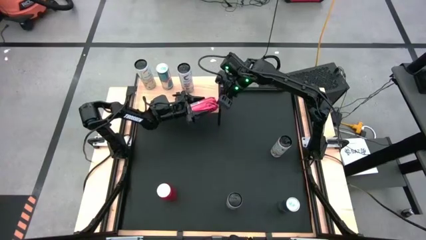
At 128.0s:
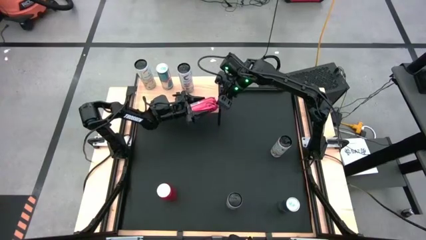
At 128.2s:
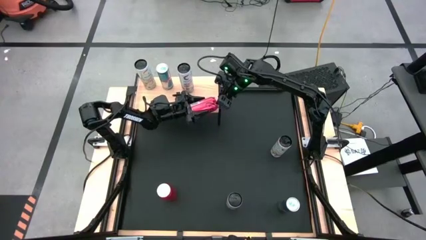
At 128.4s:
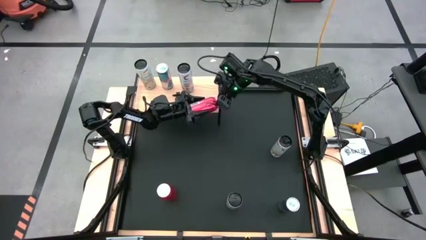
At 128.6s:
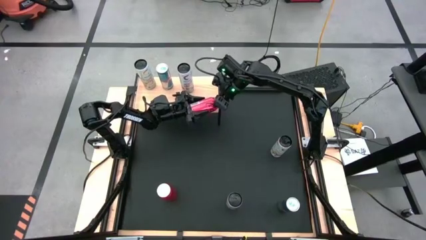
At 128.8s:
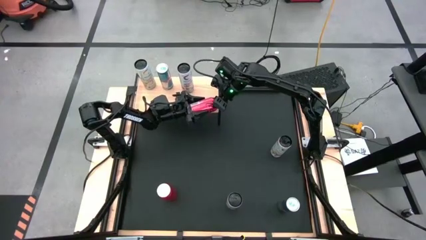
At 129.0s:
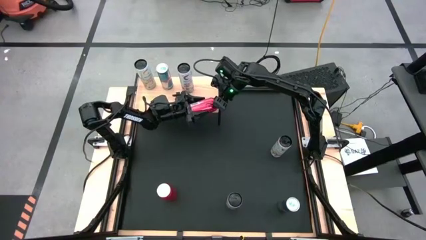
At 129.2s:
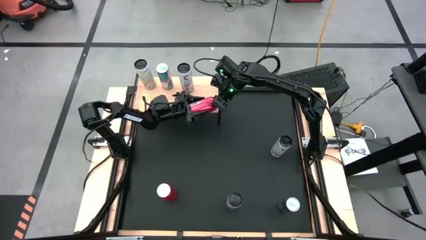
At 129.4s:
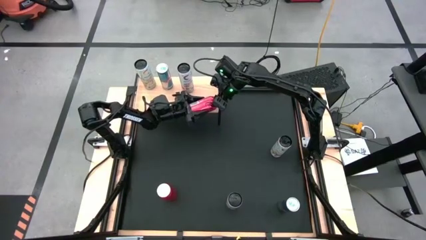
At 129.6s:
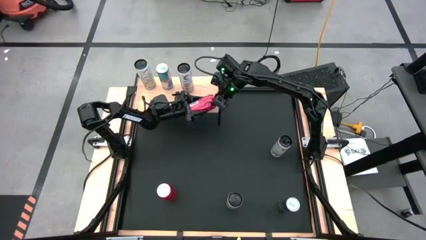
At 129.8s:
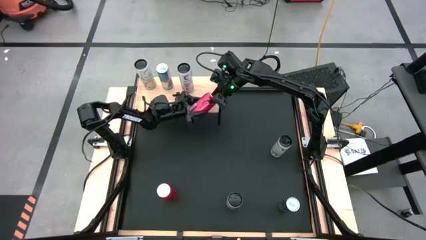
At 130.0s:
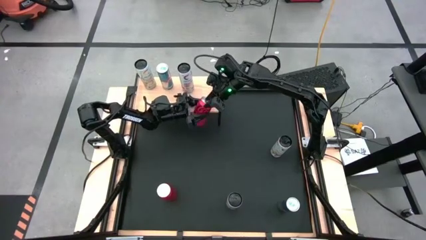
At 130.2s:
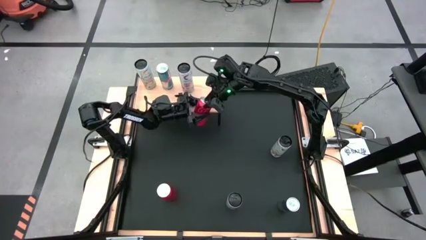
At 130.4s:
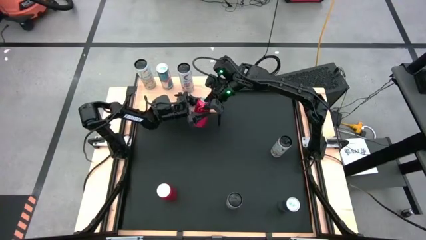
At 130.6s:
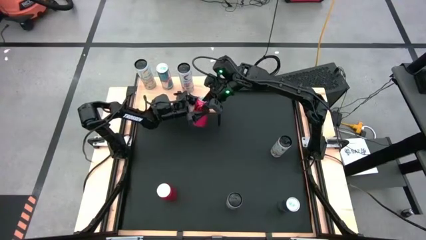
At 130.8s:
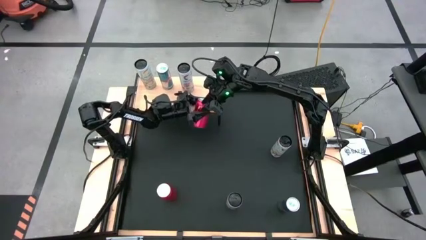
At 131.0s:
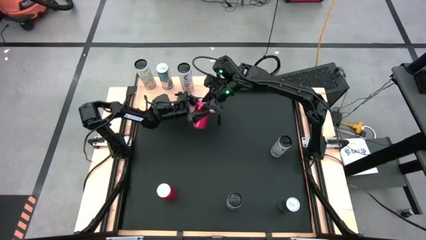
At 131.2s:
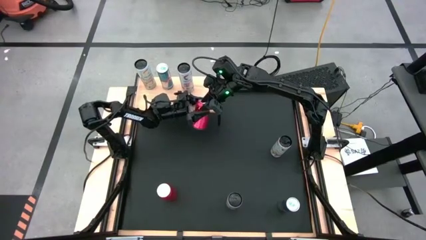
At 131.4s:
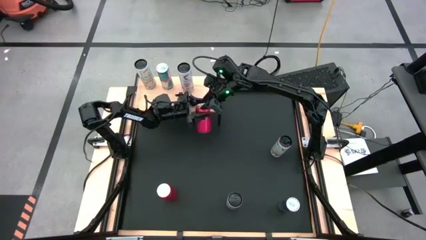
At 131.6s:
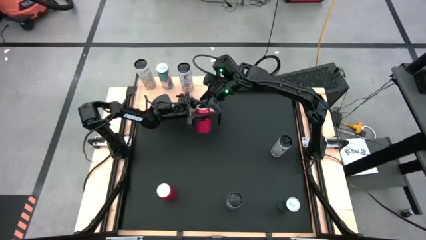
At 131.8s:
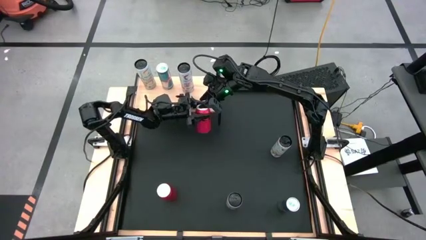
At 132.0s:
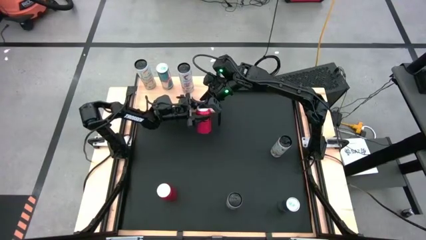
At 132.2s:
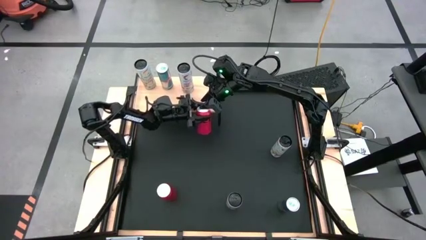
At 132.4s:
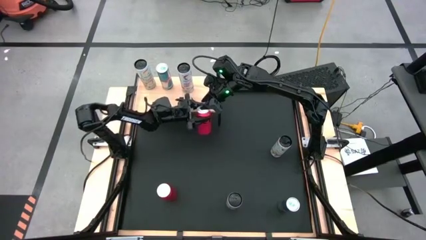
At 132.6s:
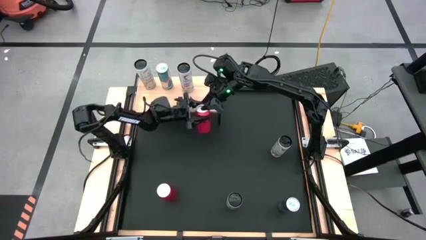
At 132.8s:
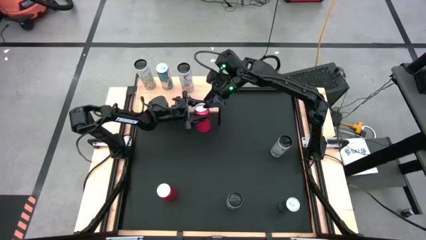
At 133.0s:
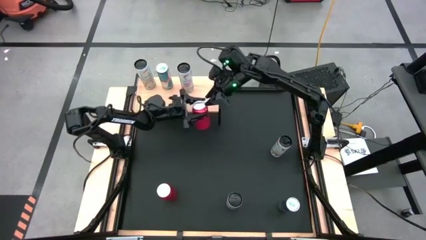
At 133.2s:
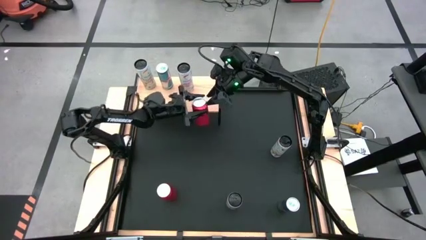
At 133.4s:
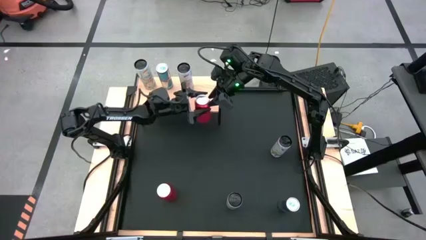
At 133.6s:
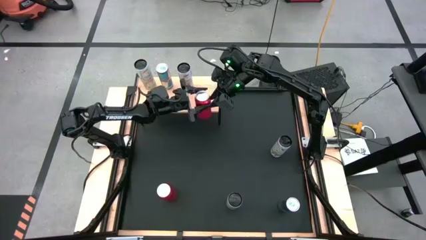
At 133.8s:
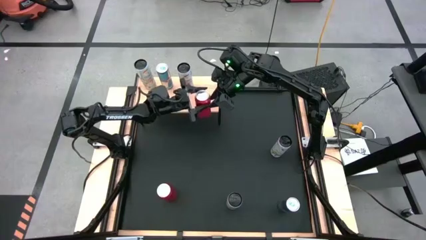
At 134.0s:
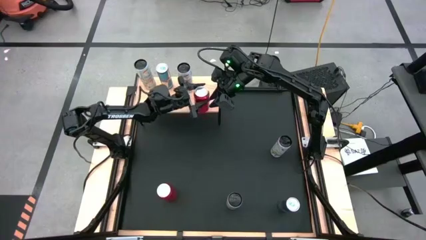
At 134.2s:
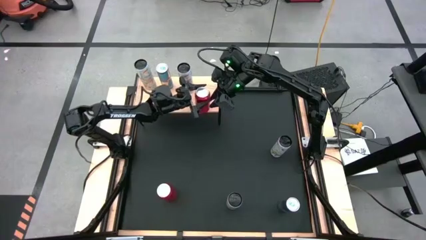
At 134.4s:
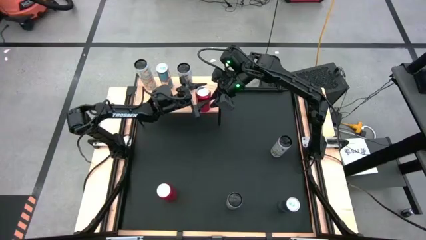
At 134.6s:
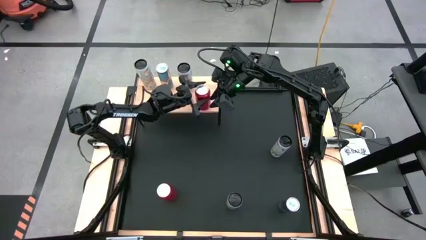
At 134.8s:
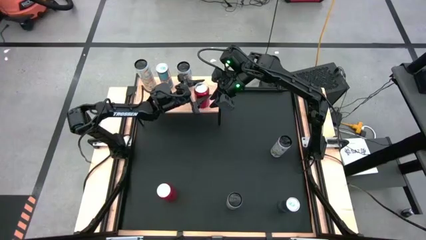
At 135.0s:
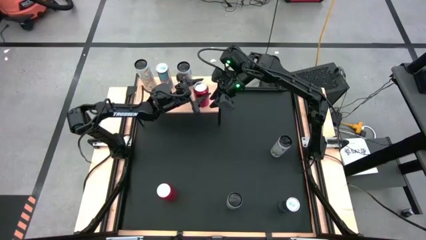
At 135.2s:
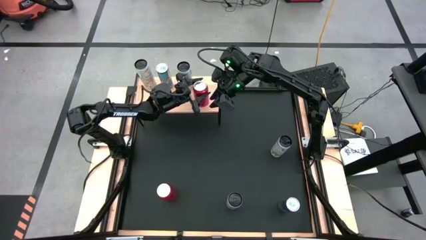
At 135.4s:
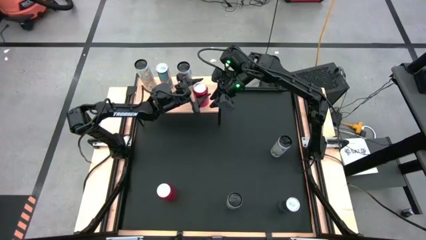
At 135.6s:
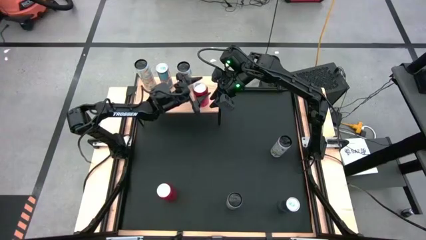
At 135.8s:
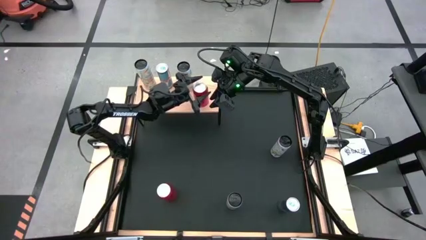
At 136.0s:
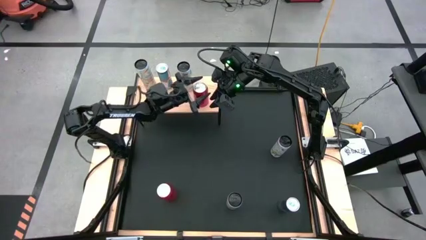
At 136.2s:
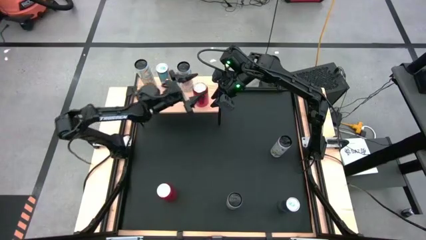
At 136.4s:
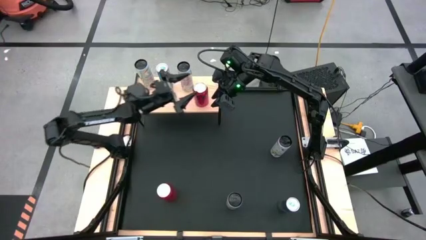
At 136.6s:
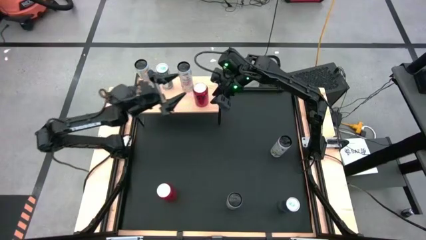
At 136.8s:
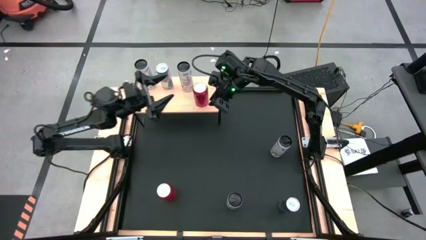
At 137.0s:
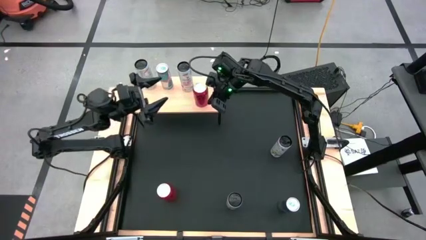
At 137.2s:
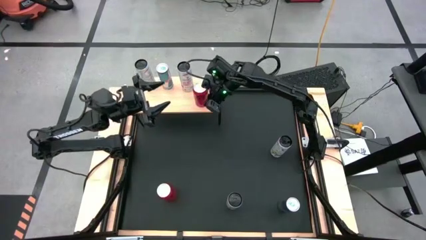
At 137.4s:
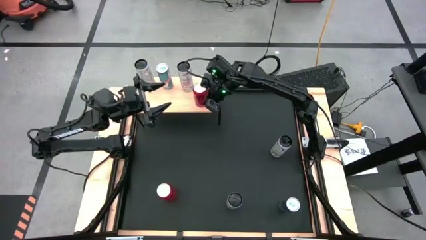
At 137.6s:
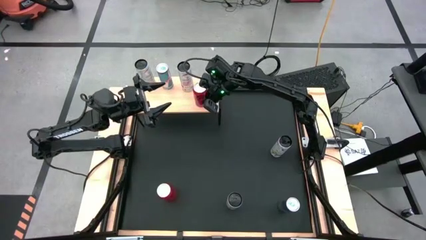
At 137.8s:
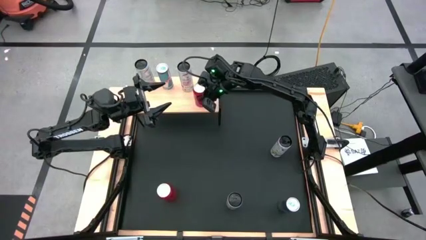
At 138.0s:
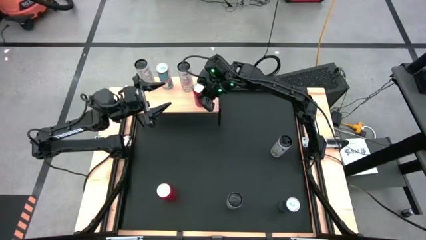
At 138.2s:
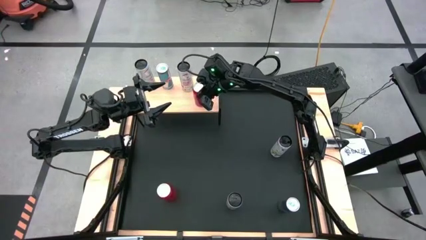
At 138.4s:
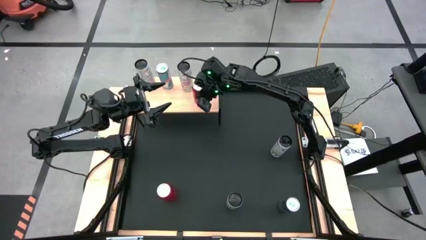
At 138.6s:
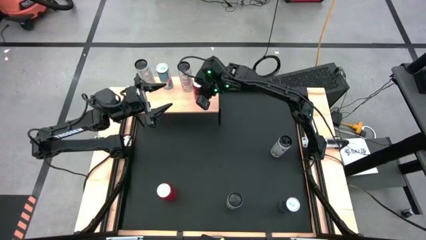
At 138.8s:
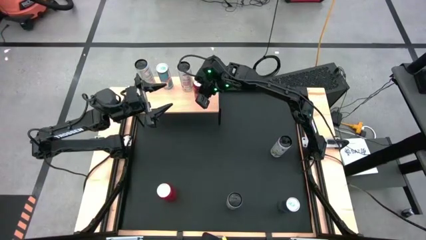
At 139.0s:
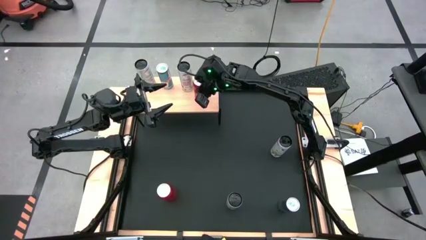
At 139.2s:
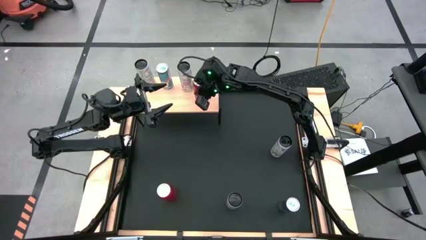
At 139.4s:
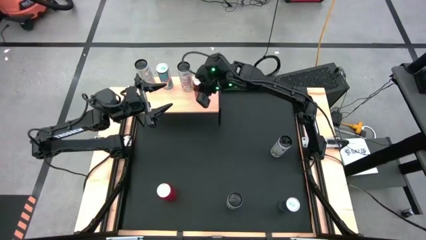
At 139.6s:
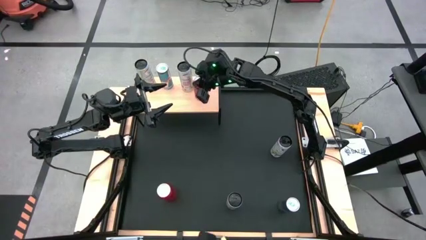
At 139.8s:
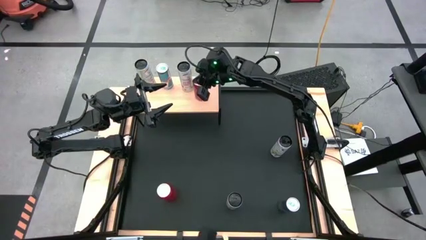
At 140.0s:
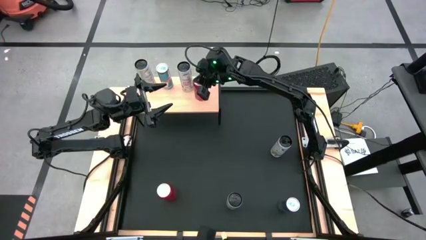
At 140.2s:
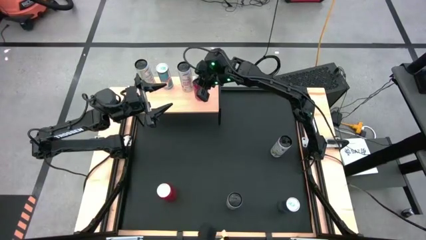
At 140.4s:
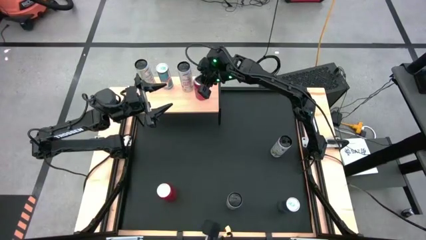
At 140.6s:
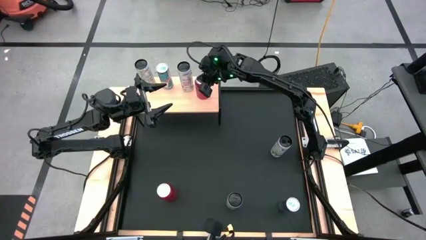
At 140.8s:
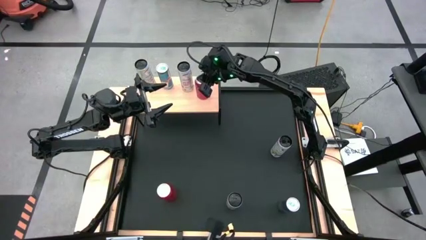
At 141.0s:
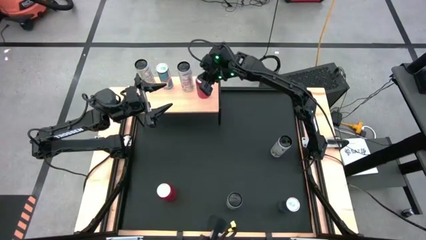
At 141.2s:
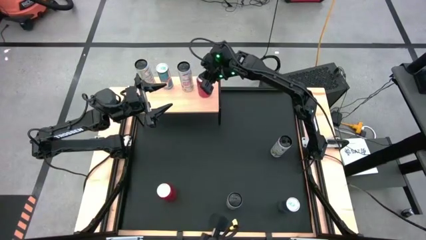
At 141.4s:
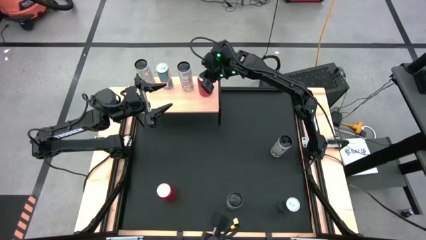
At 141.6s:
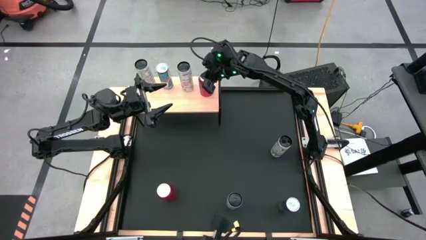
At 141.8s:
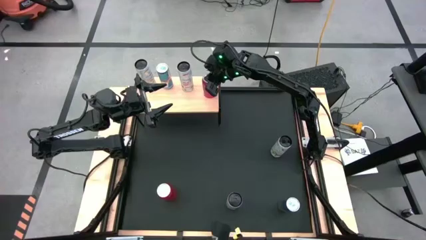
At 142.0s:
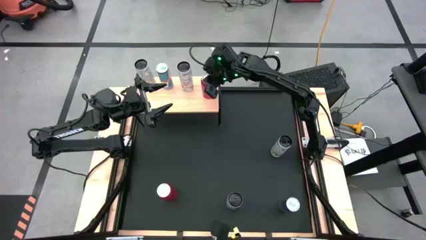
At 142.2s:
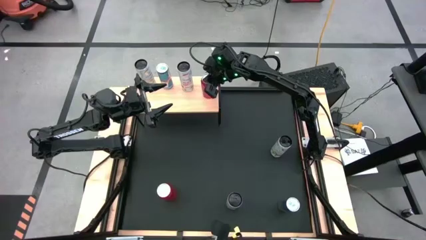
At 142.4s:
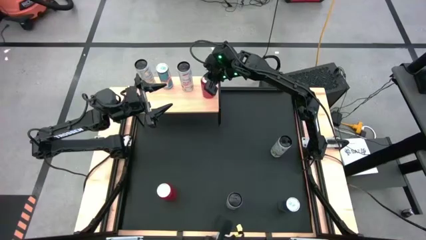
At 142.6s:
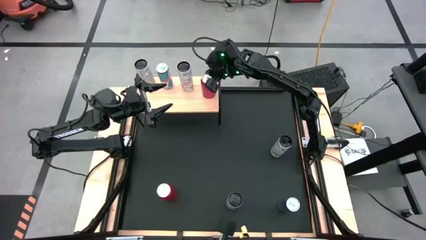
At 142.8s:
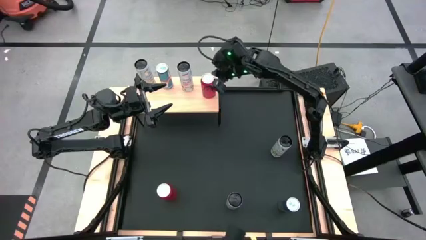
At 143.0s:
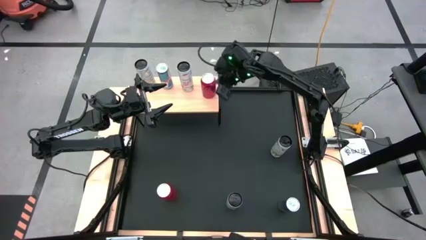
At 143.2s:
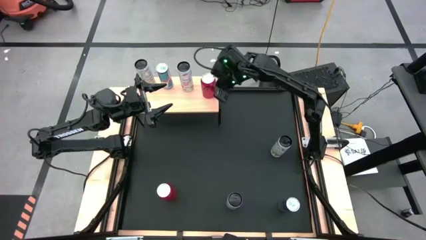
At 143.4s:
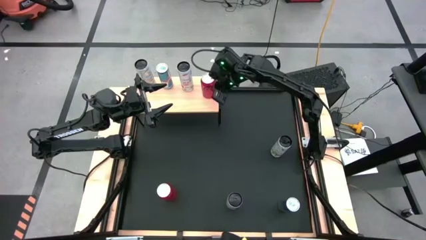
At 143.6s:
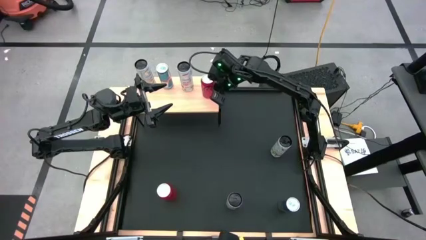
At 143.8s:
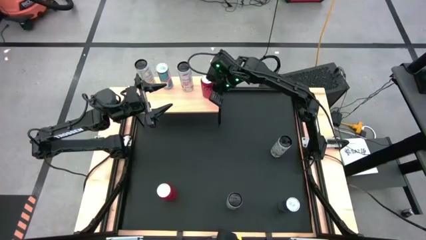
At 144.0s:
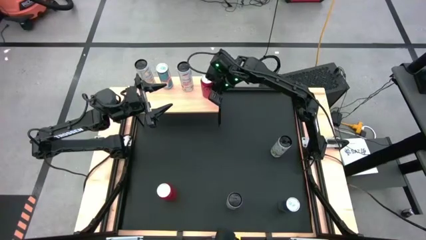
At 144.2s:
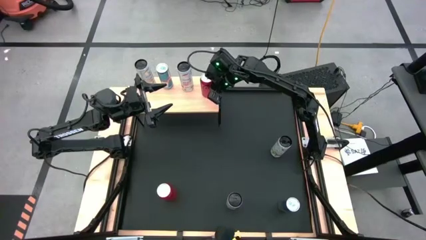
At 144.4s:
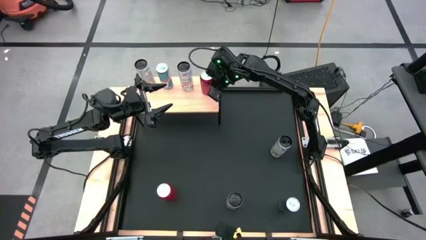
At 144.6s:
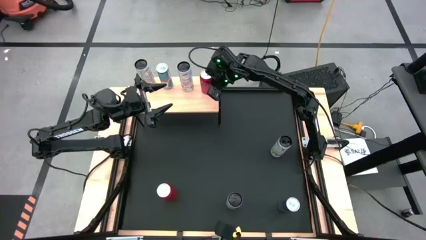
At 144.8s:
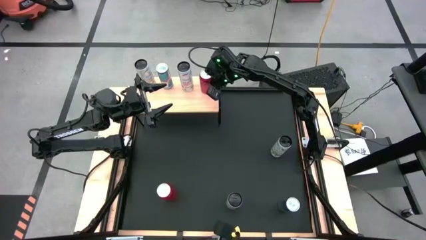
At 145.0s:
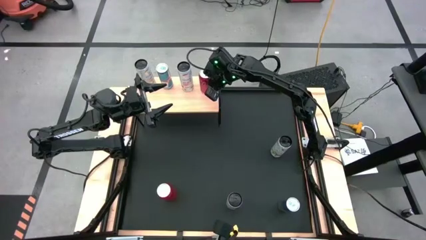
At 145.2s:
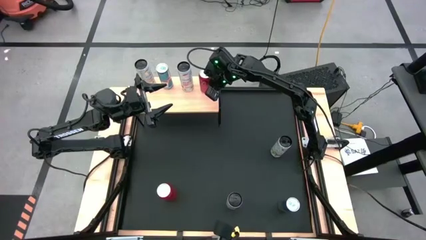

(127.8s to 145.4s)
Task: Place canned beverage on shelf
Put the top red black soda can on the shelf
